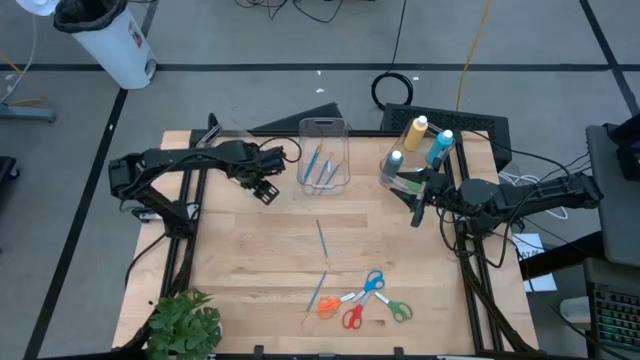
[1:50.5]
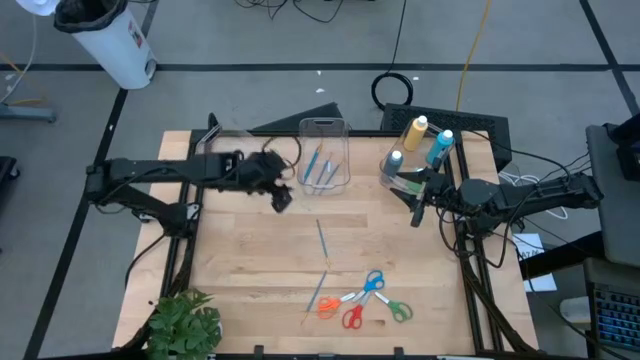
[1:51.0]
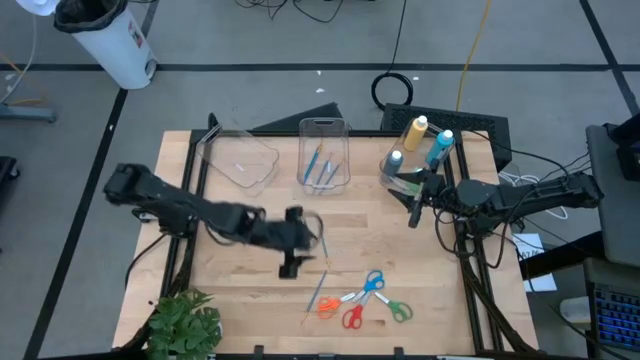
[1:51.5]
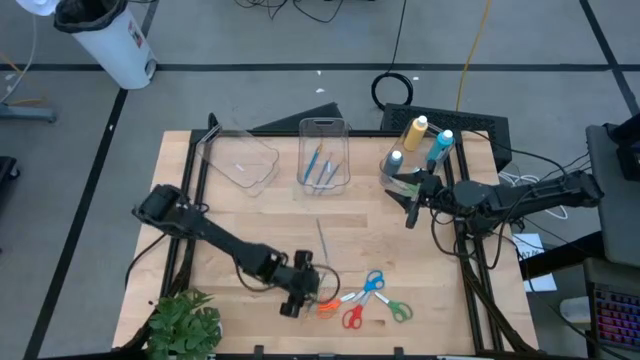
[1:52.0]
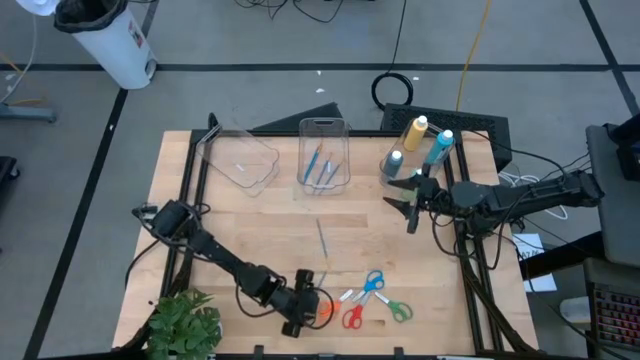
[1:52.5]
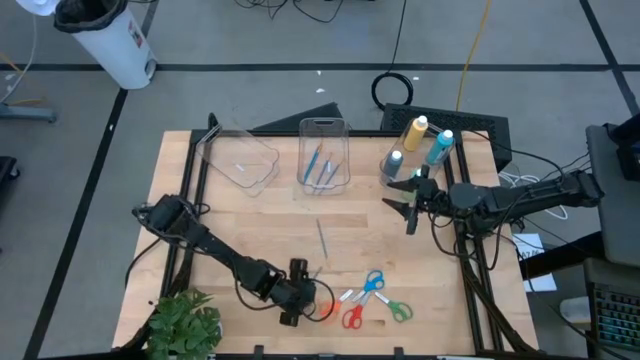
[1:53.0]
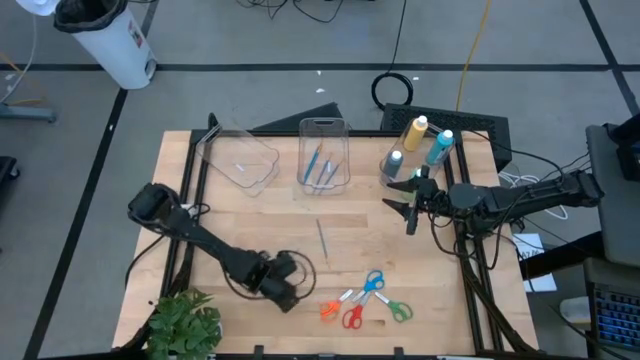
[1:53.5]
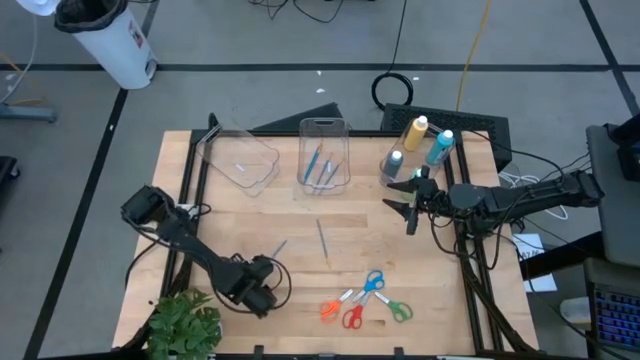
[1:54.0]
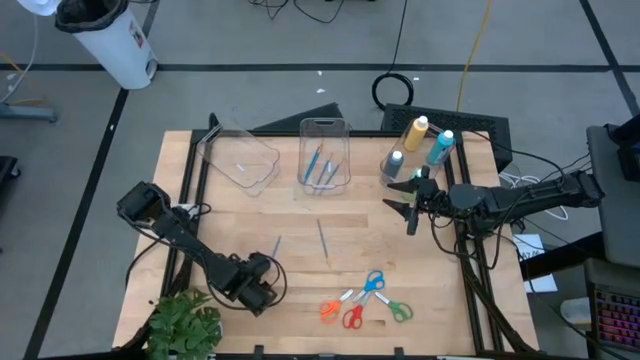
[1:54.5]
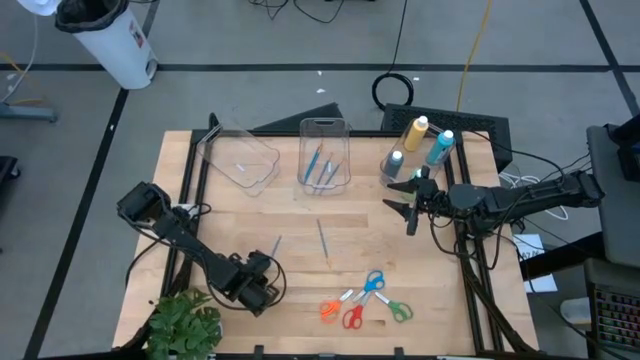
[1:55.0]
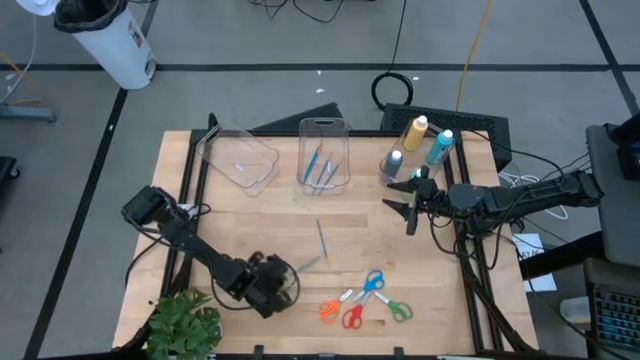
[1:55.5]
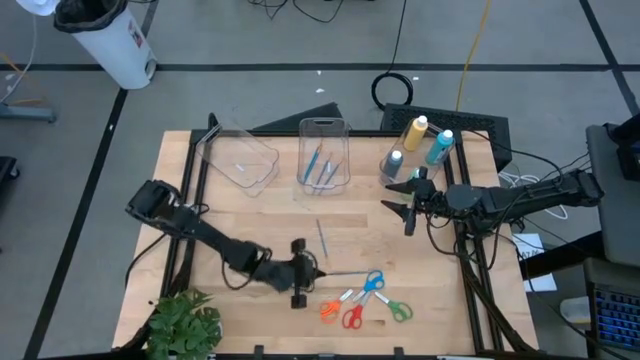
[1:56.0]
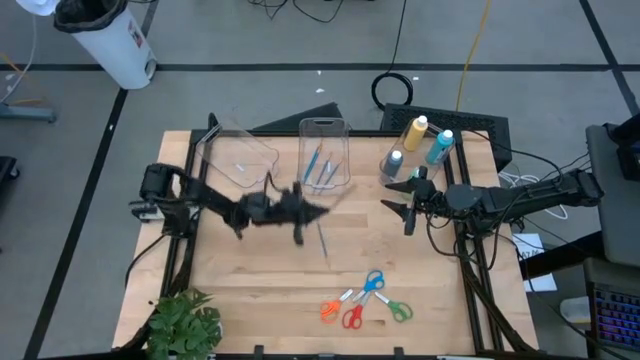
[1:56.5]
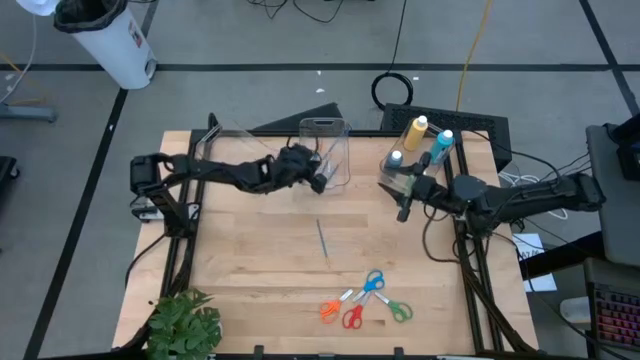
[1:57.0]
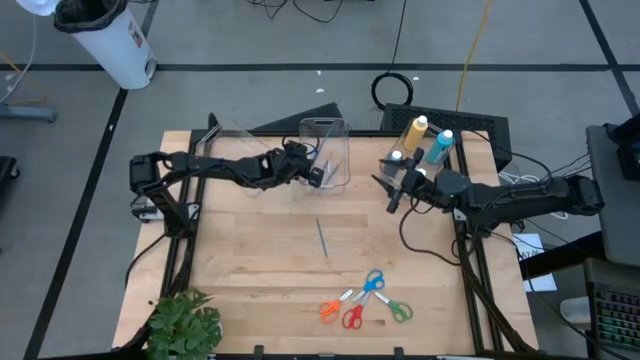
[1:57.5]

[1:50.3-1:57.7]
Task: Pick & Place Paint Supplies
Put the blue paint brush into the middle transparent bin

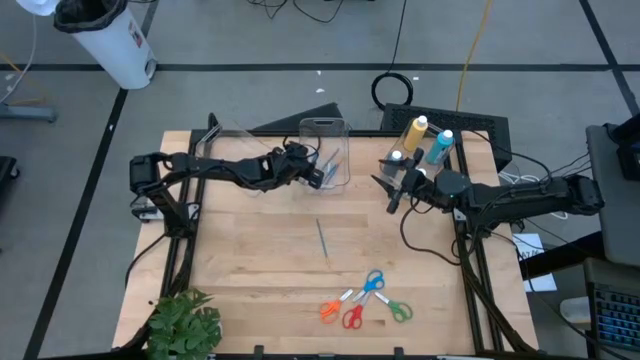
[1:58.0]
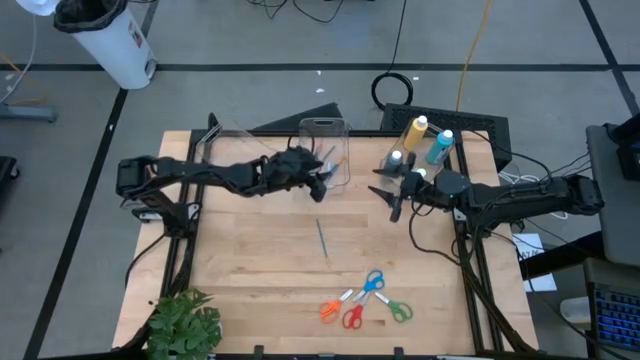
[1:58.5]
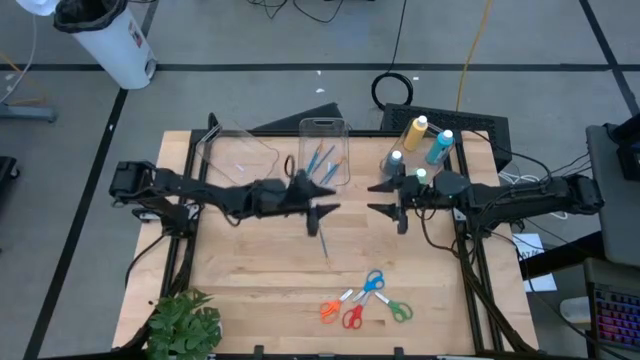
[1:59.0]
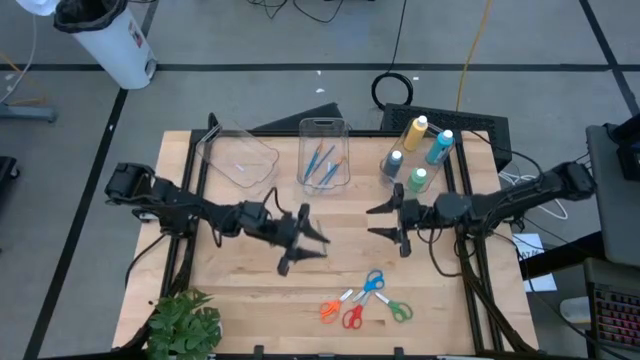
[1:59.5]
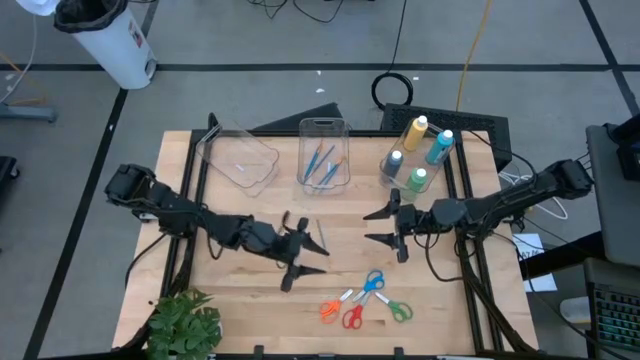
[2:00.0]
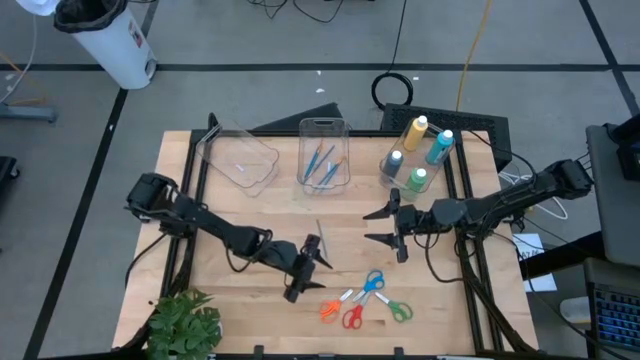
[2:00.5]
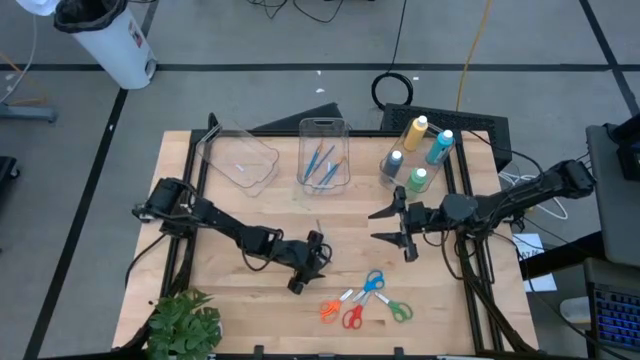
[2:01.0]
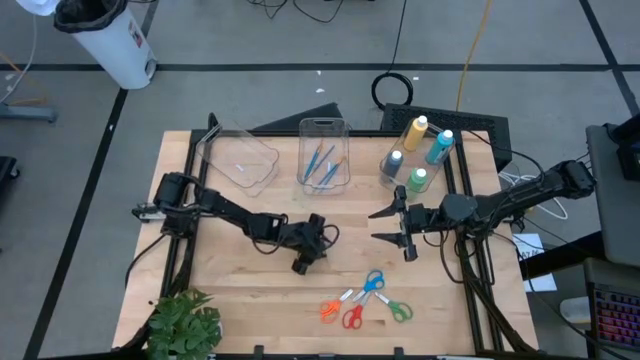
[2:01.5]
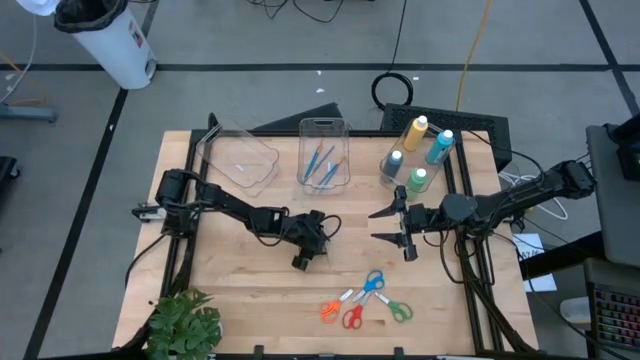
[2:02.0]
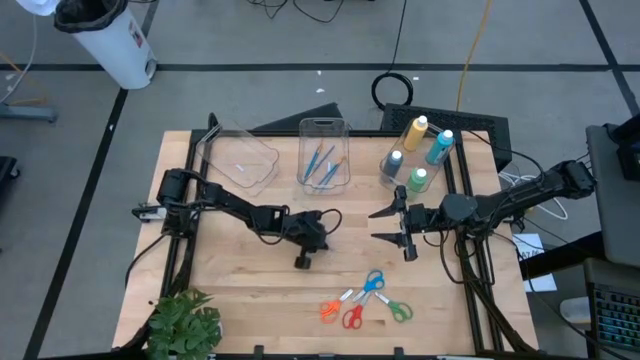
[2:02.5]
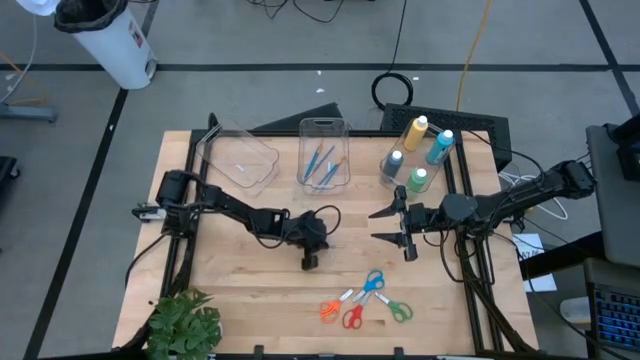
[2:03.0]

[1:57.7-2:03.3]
Put the blue paint brush into the middle transparent bin

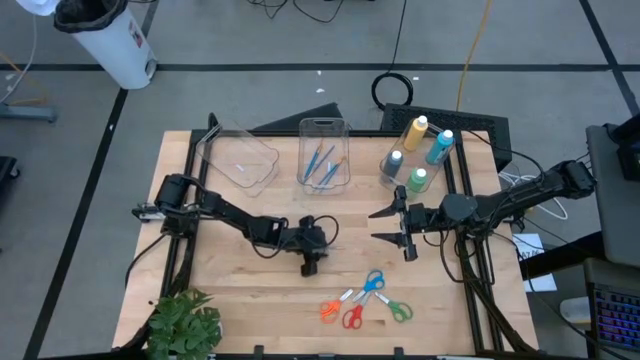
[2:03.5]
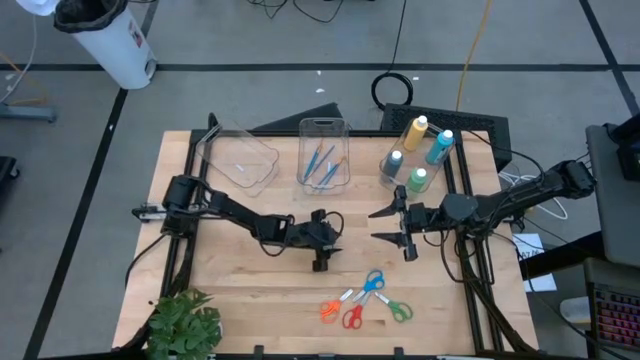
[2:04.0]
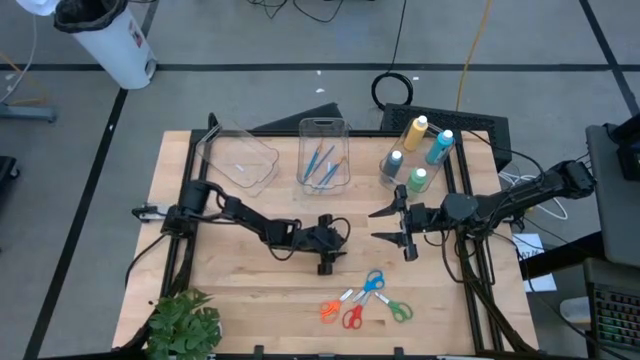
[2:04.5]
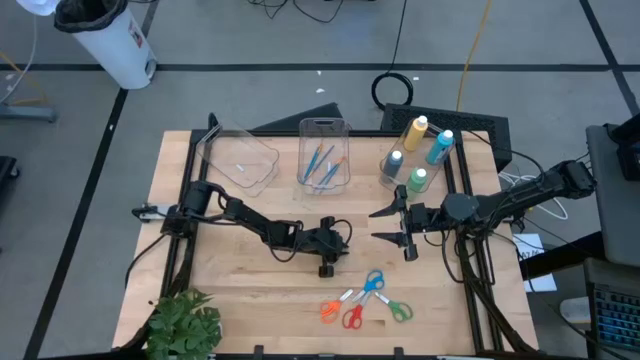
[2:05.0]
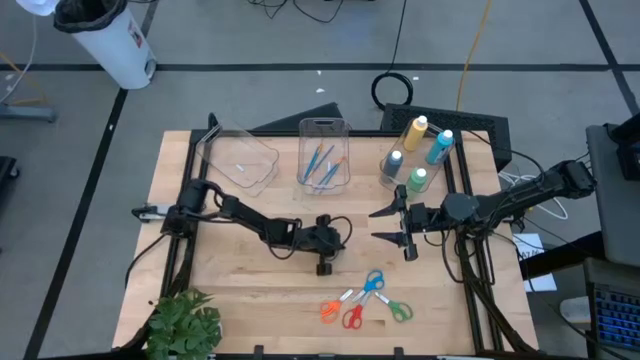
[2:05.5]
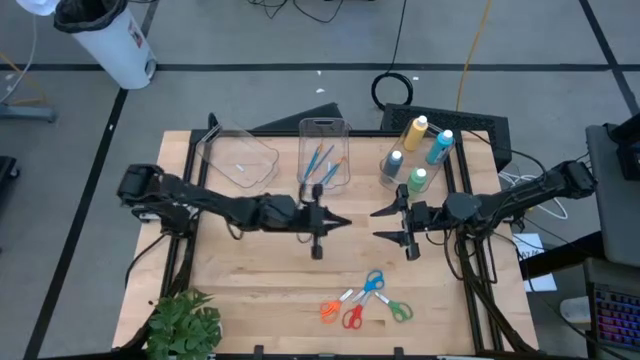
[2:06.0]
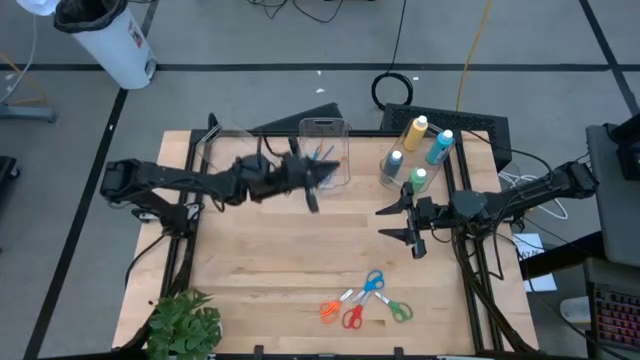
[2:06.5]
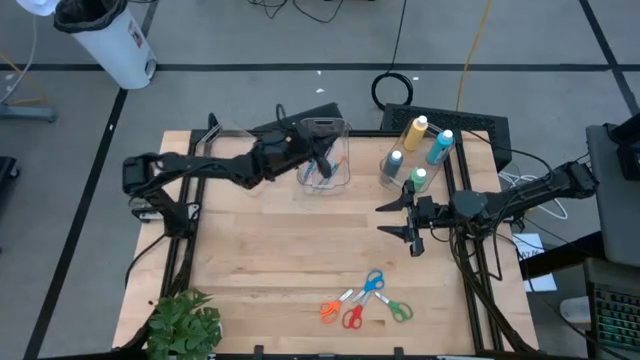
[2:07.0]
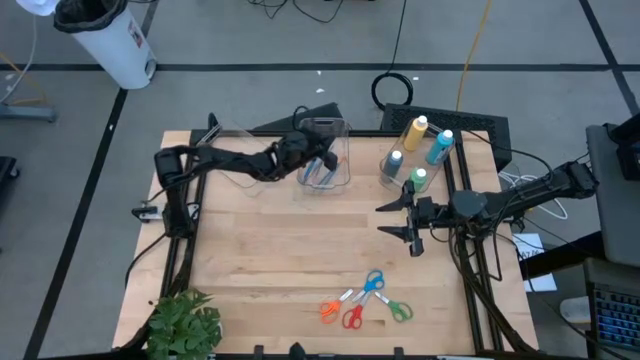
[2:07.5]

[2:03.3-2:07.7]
Put the blue paint brush into the middle transparent bin

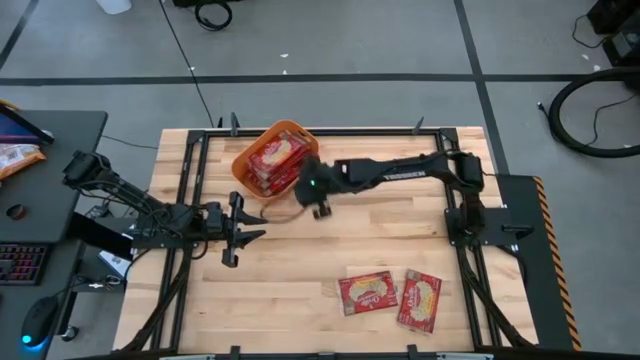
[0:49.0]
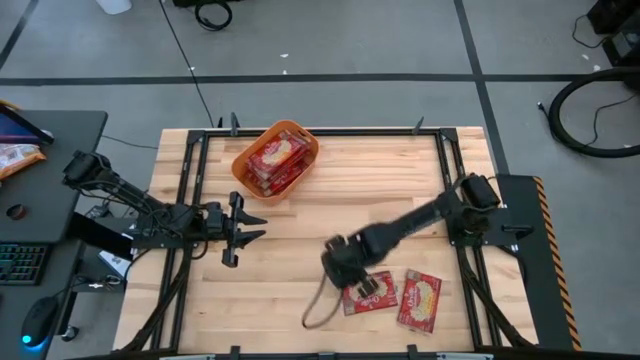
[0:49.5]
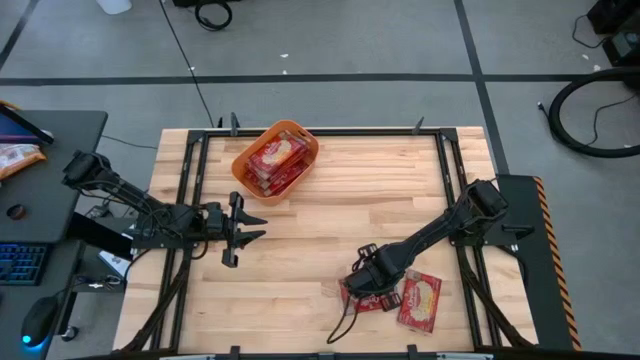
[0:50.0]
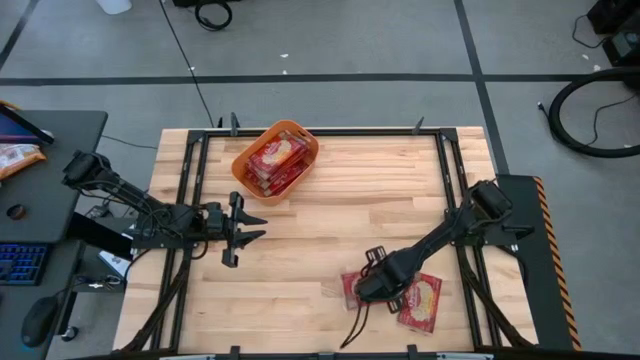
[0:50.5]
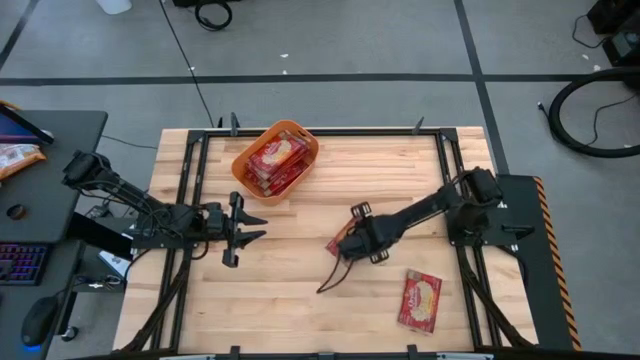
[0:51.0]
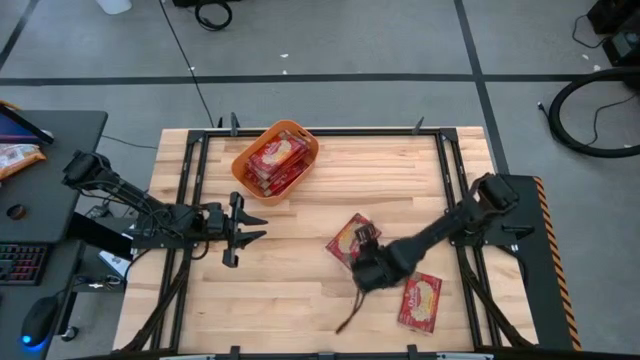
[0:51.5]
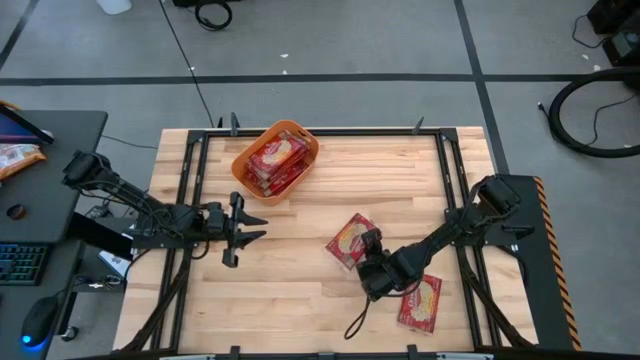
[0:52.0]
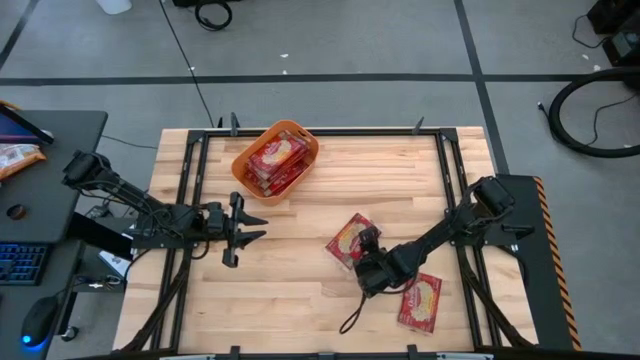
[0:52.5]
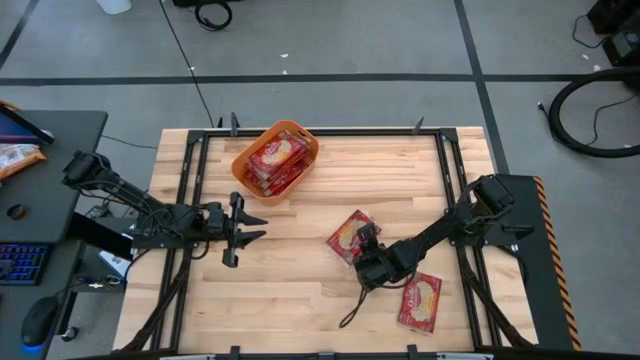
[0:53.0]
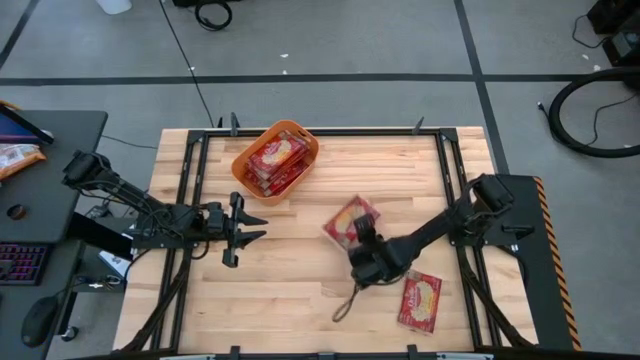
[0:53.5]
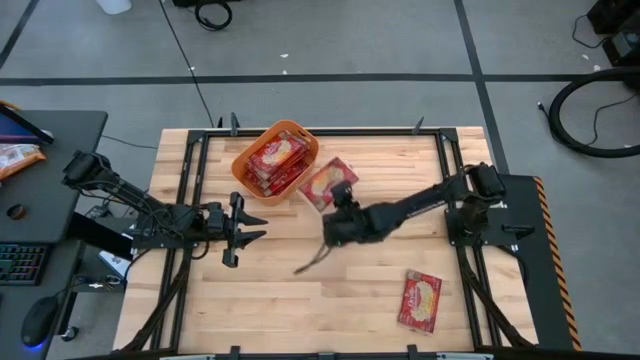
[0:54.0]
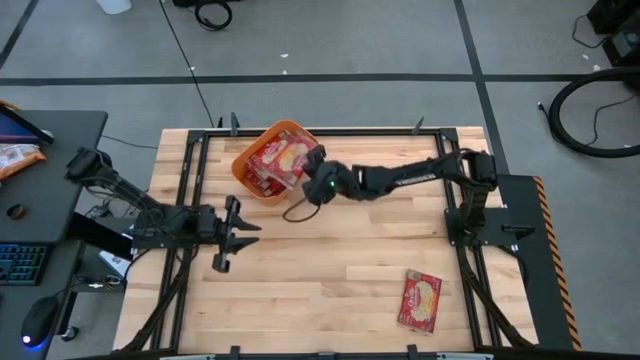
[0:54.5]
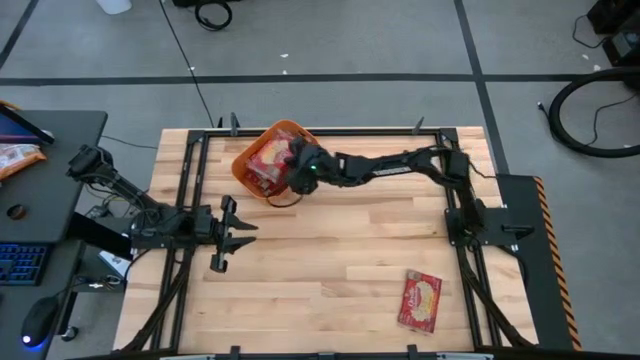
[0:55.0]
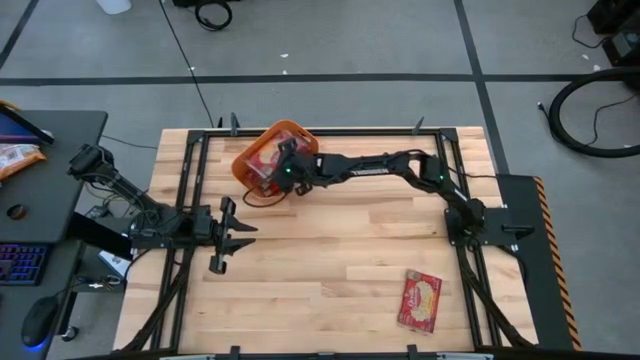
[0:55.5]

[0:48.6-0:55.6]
Task: Sort popcorn bags into baskets
Put the red popcorn bag into the orange bin
